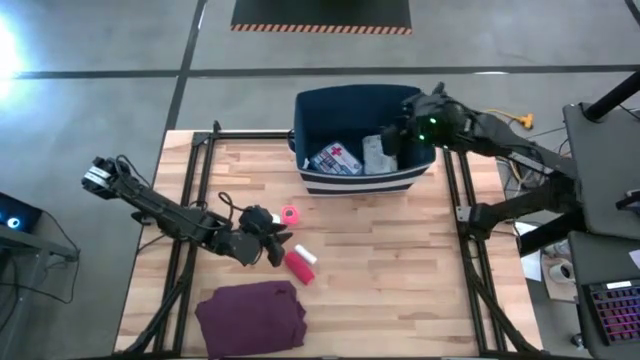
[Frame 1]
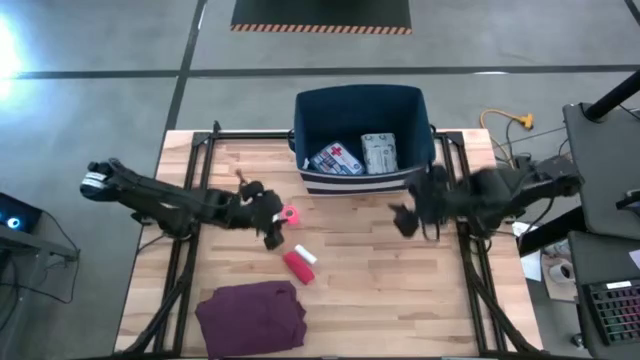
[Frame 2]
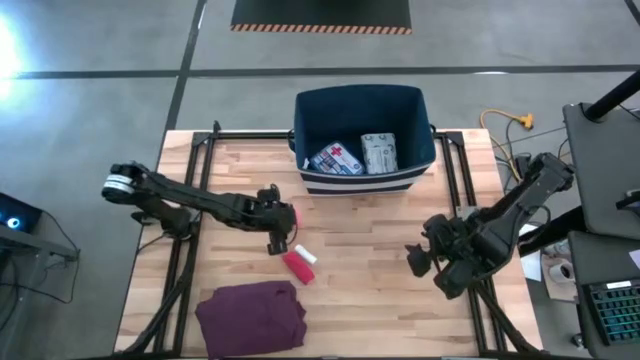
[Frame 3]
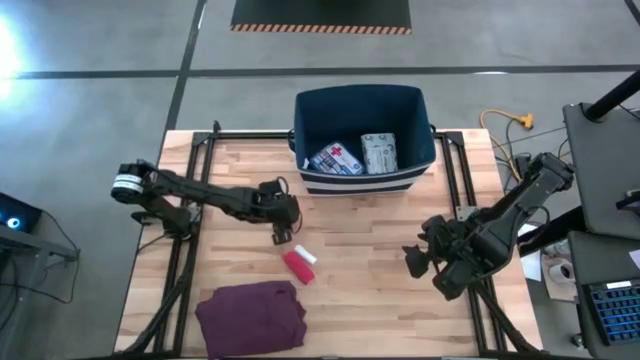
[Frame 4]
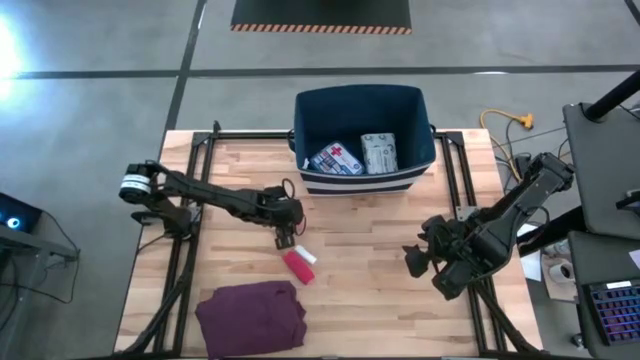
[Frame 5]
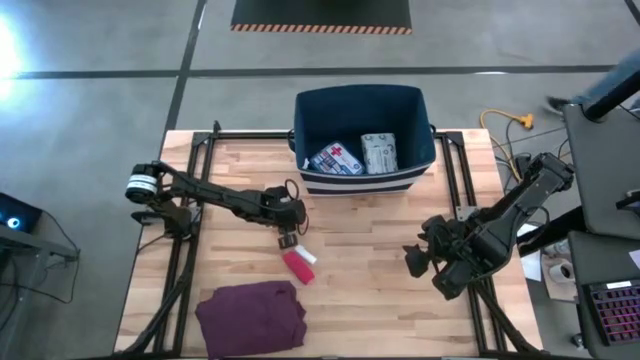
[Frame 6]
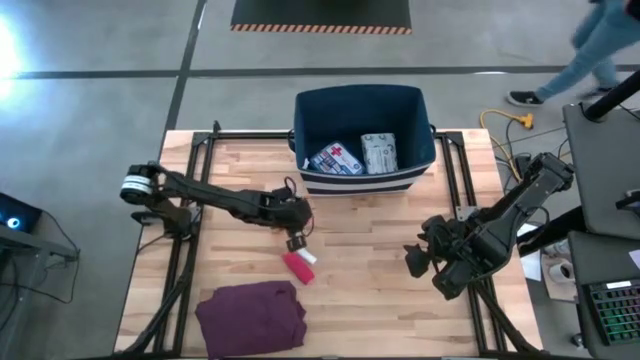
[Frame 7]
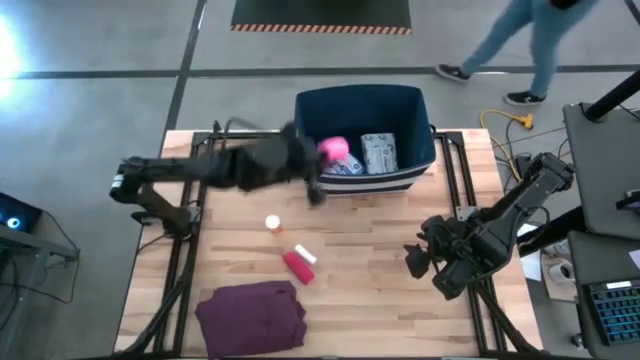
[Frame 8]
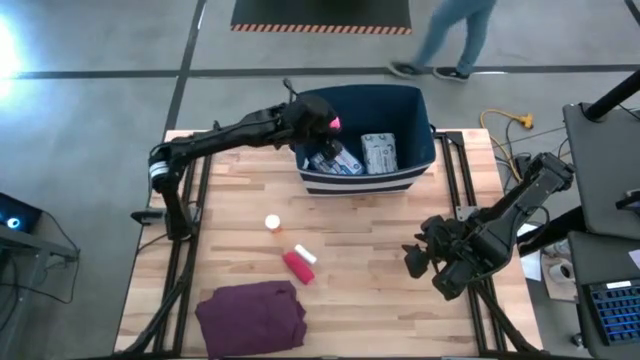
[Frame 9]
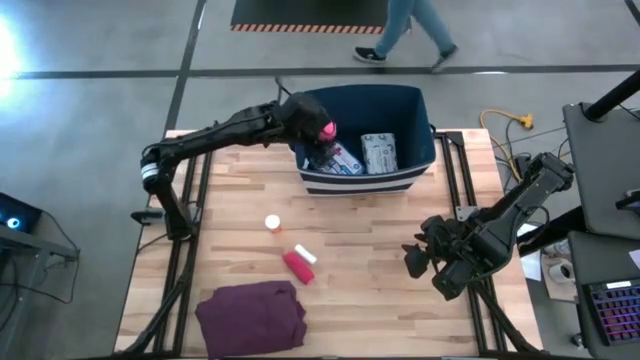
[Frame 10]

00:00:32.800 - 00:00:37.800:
Task: Pick & place medical supplies in basket/bin
Put the pink bandage into the blue bin

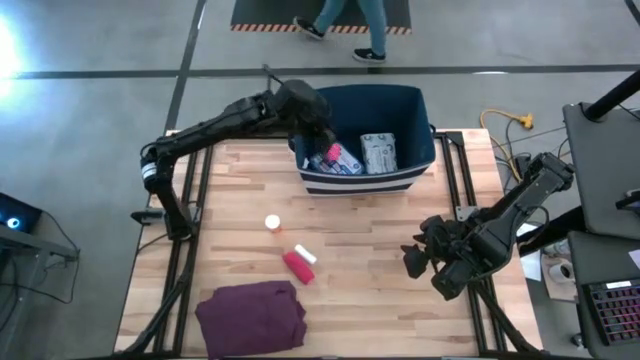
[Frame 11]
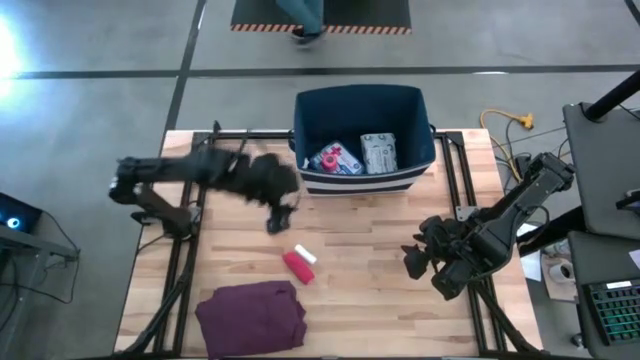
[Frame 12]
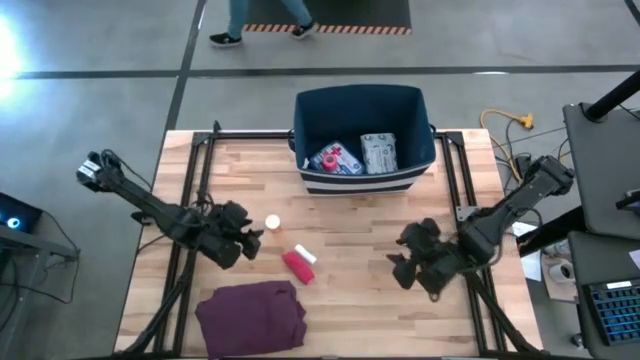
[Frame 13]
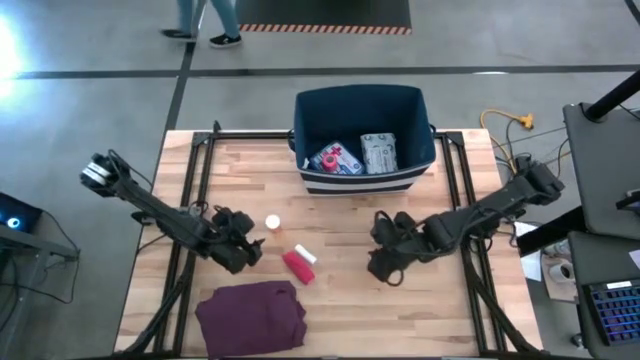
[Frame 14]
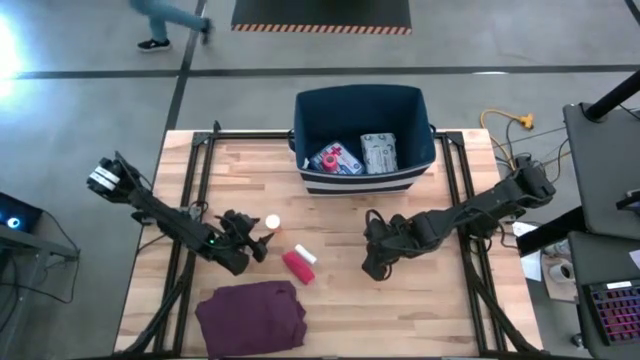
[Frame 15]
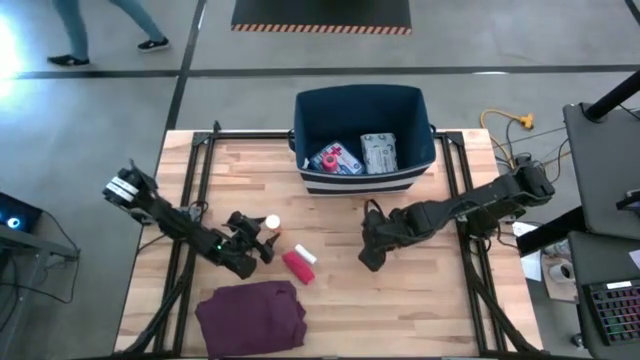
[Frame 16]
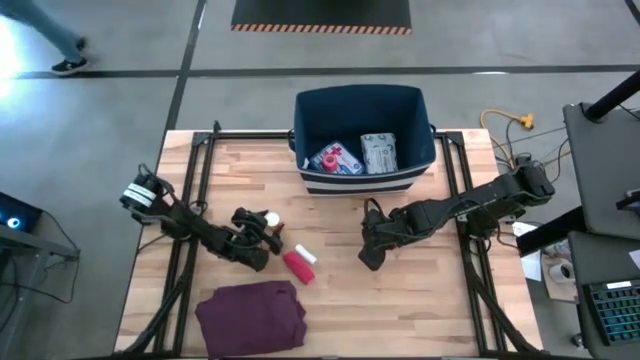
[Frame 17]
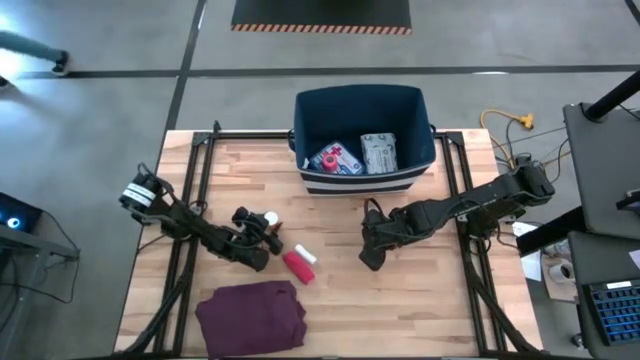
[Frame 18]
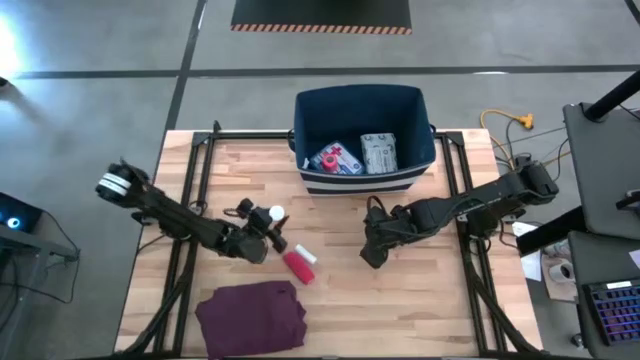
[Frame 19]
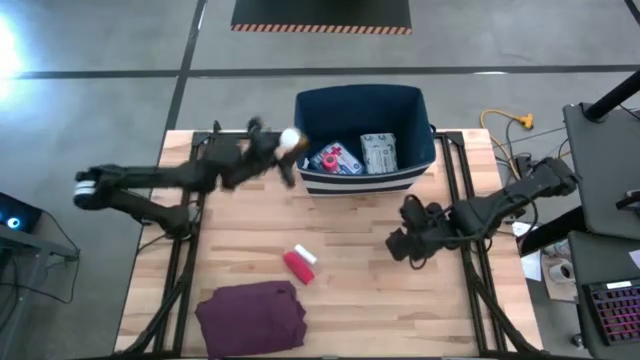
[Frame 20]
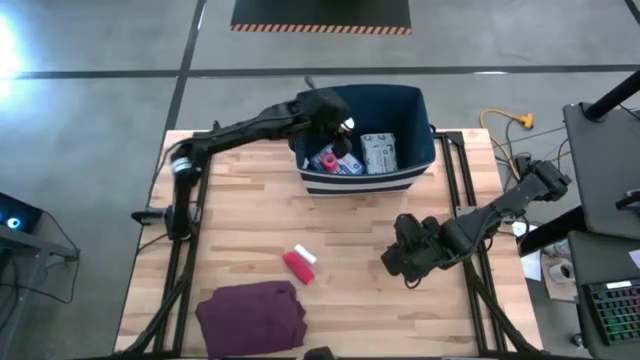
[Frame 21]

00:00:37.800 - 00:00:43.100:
Put the orange pill bottle into the blue bin

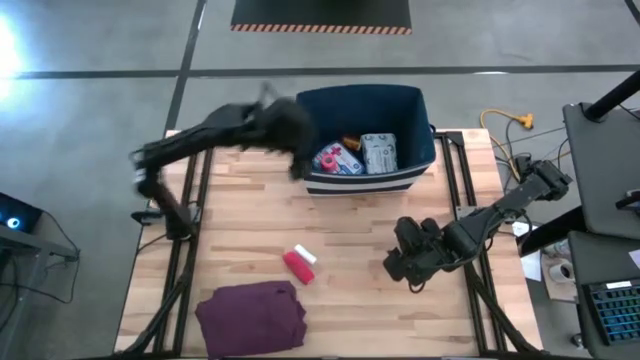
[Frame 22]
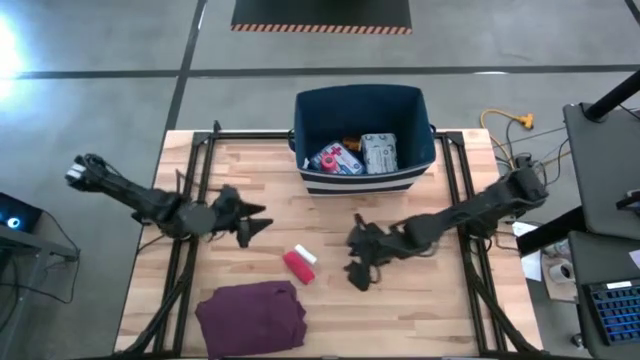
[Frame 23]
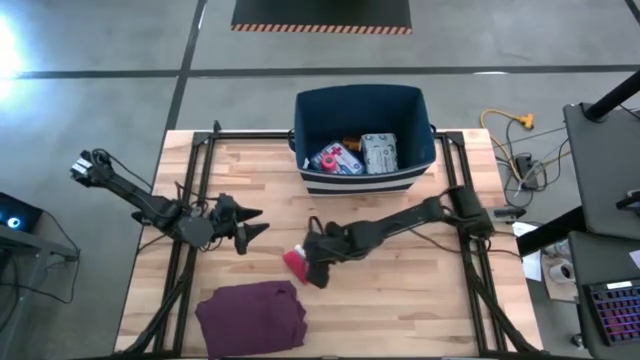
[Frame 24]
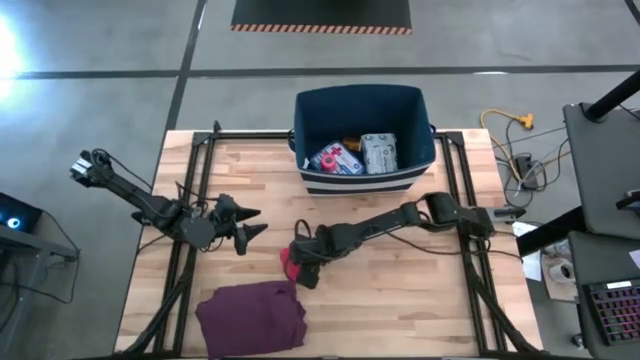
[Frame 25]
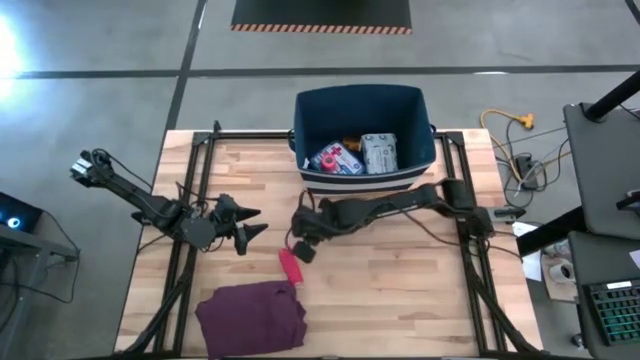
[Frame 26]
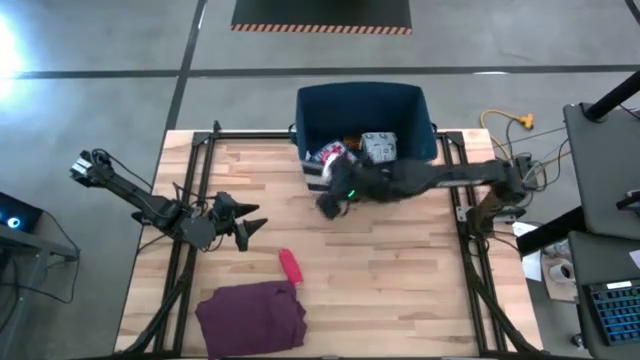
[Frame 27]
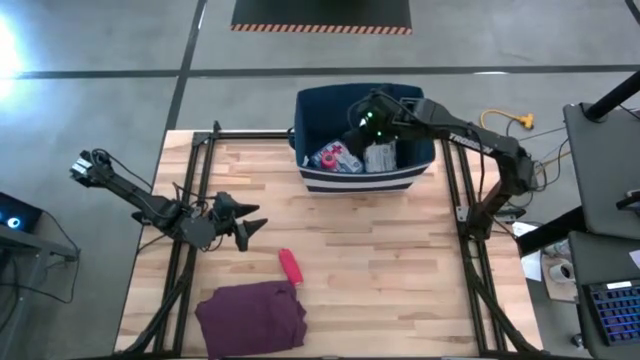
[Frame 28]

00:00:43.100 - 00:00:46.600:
Put the white rolled gauze into the blue bin

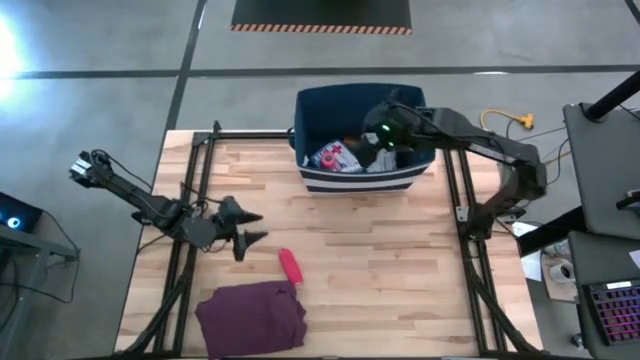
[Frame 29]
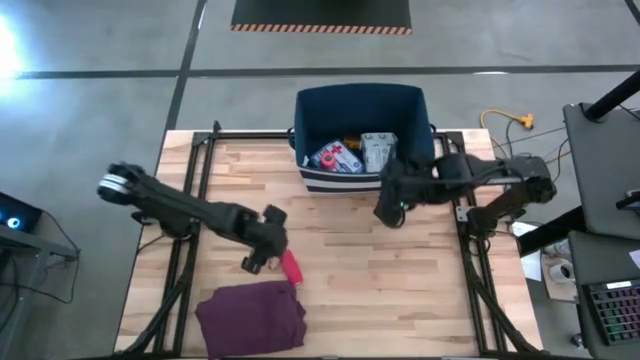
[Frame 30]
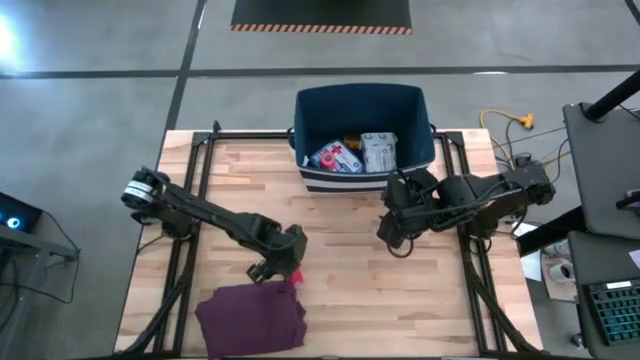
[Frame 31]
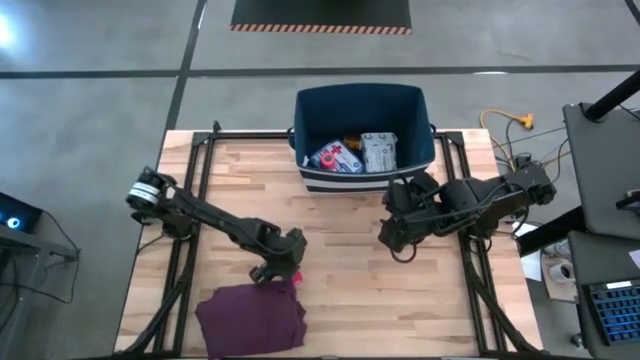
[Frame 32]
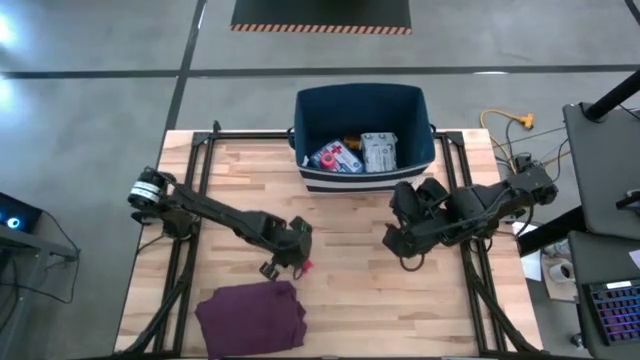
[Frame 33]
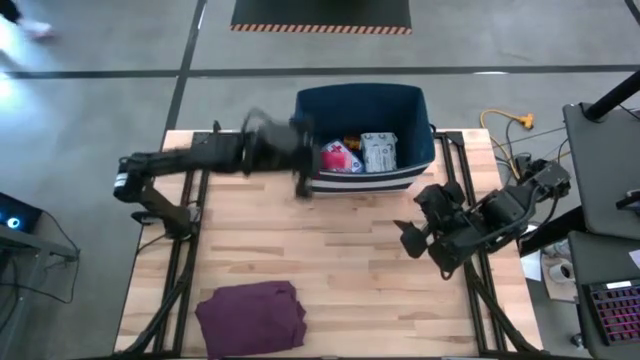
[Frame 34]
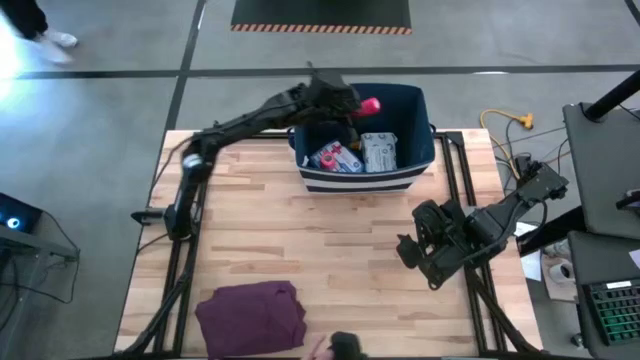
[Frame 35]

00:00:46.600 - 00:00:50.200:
Put the red bandage into the blue bin

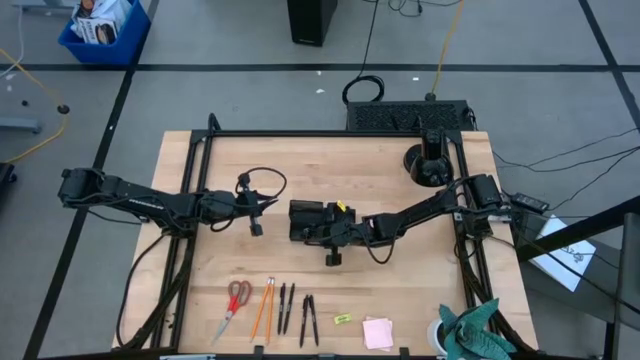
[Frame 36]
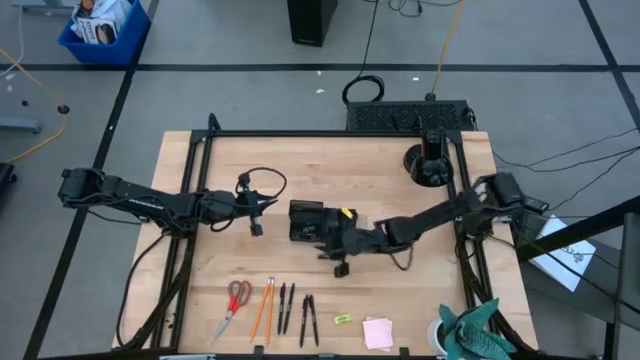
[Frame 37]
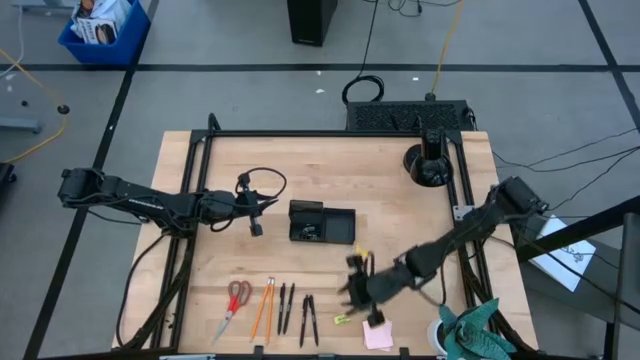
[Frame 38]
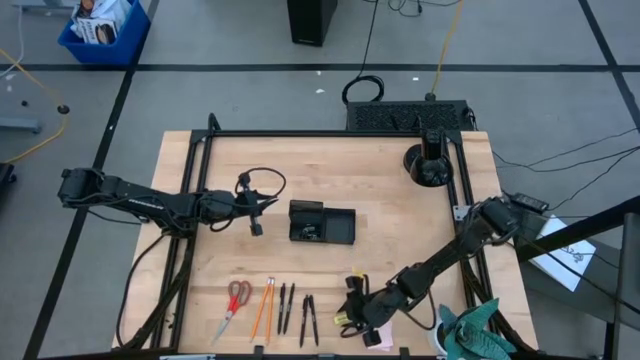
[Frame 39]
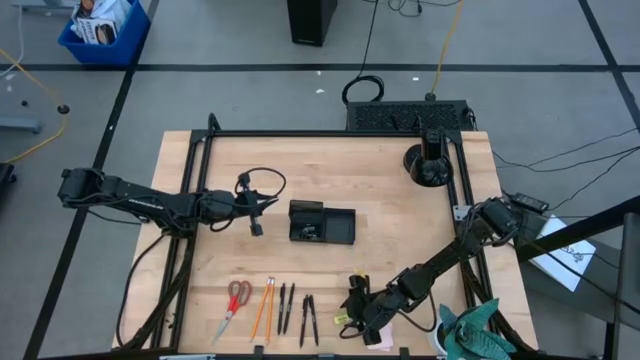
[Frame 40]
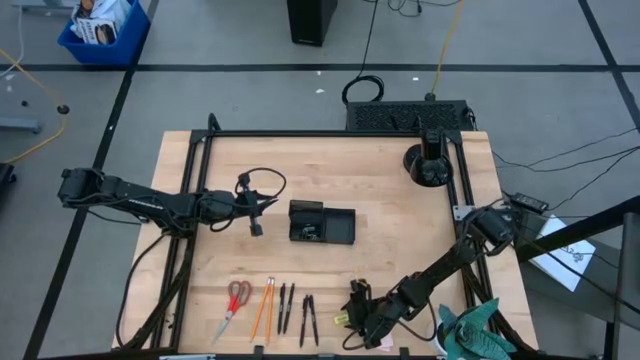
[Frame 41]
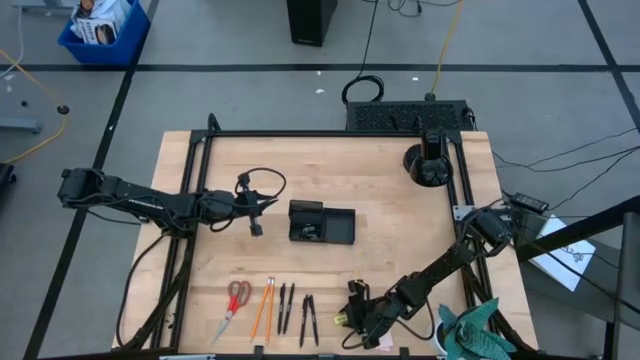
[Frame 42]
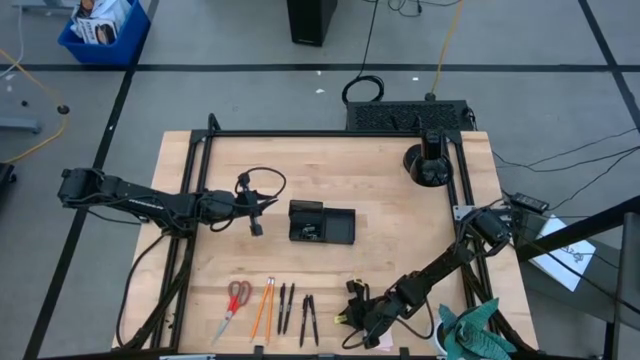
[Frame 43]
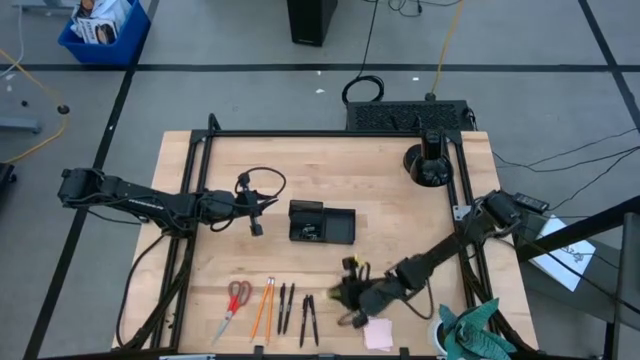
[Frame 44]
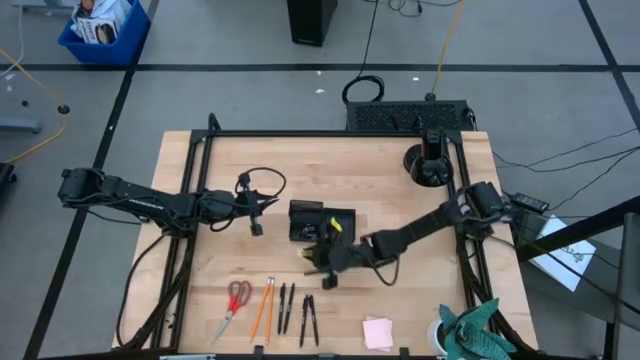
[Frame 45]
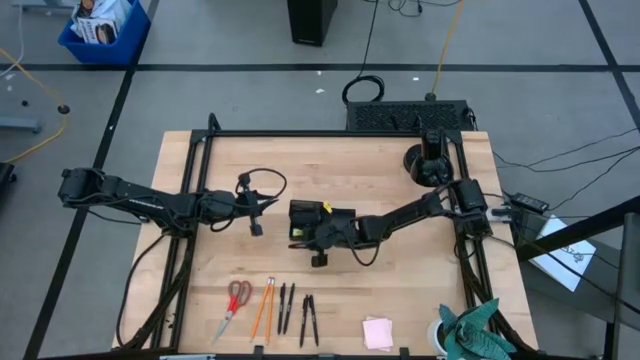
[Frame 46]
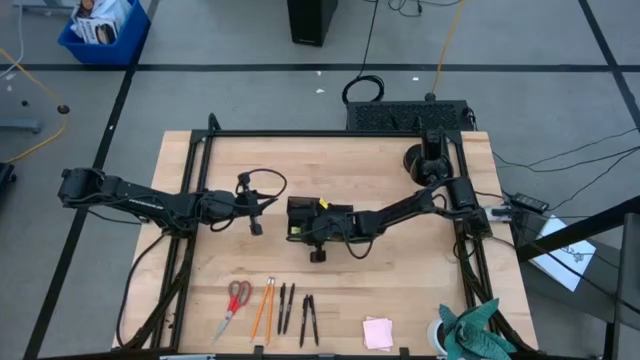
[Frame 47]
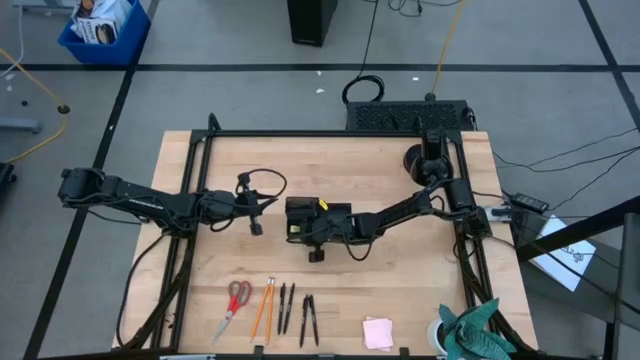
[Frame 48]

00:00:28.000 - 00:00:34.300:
Task: Pick and place office supplies into organizer
Put the yellow eraser into the black desk organizer
